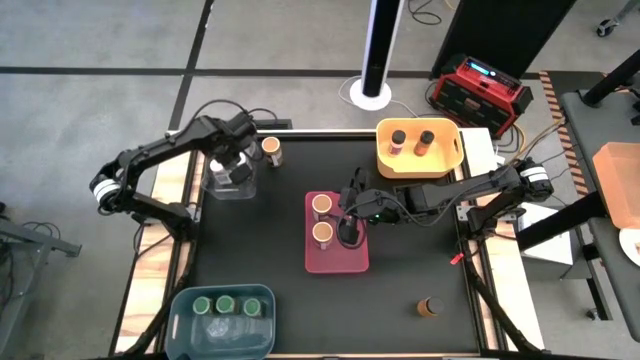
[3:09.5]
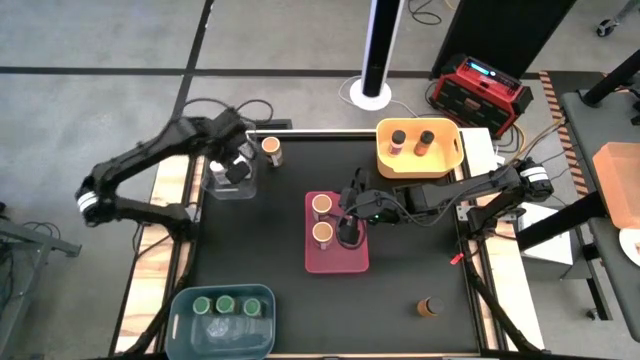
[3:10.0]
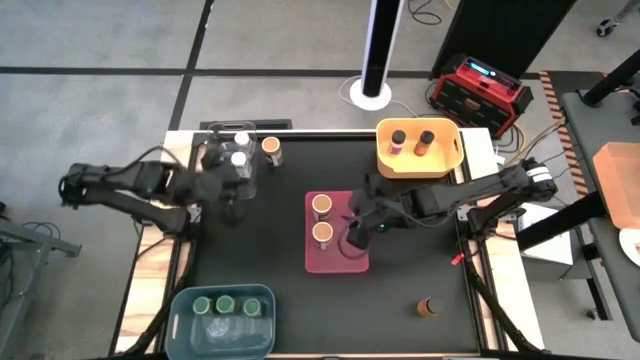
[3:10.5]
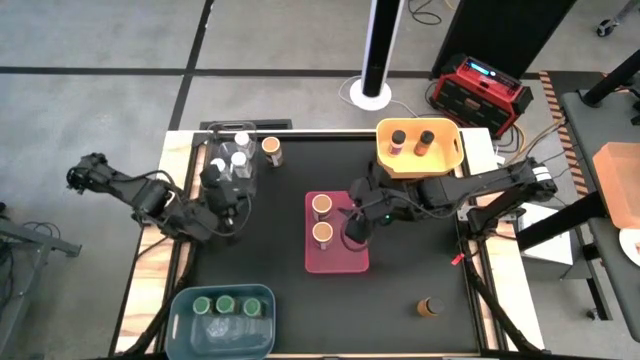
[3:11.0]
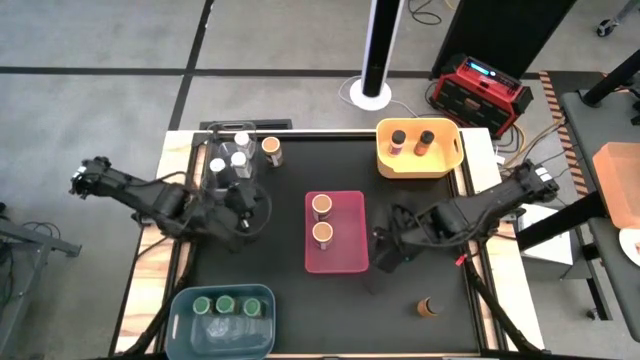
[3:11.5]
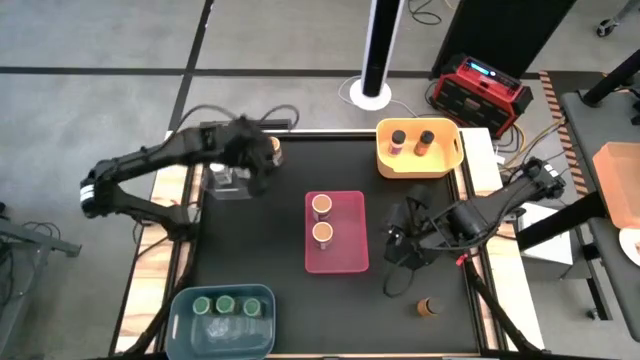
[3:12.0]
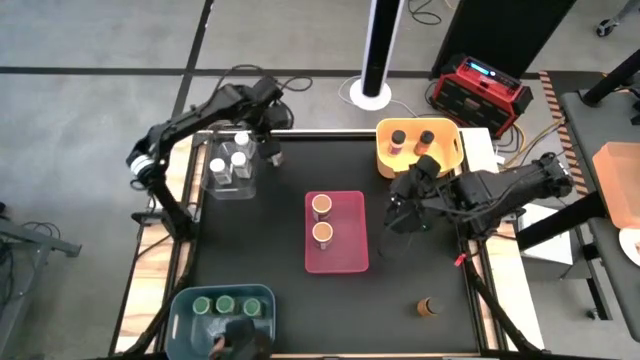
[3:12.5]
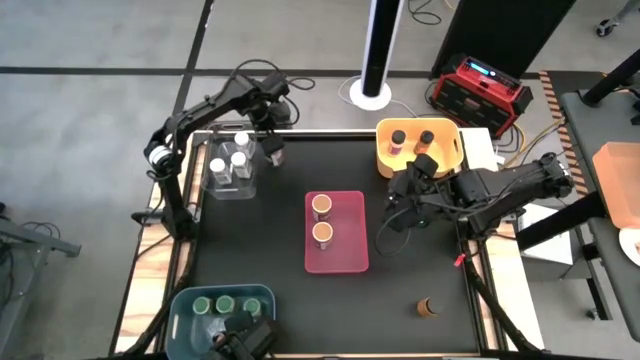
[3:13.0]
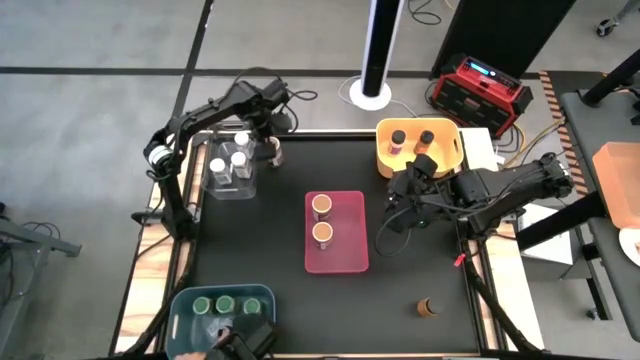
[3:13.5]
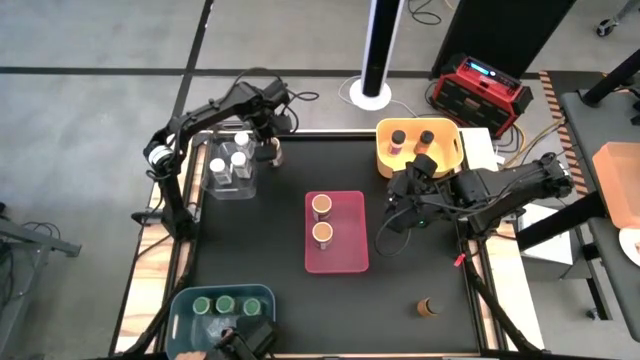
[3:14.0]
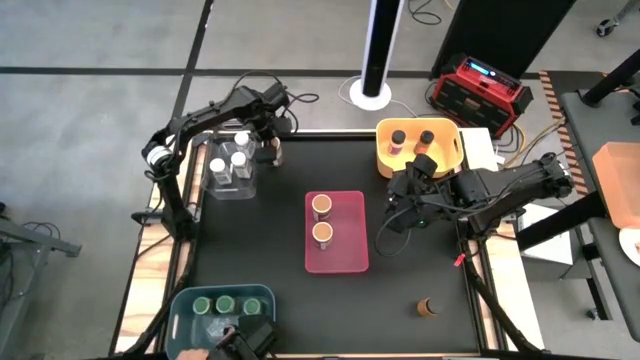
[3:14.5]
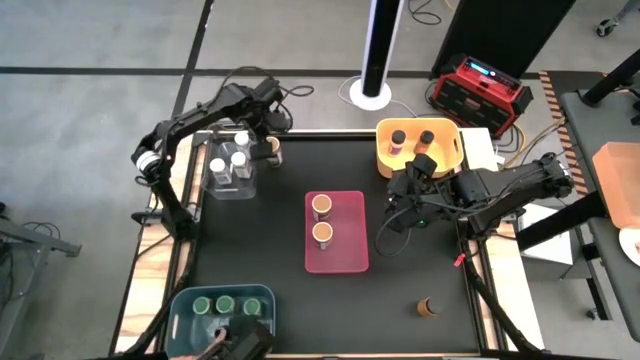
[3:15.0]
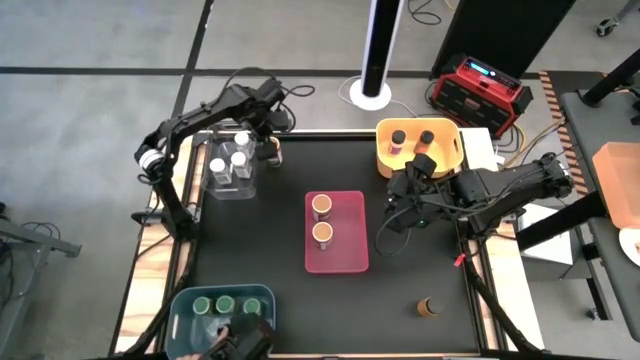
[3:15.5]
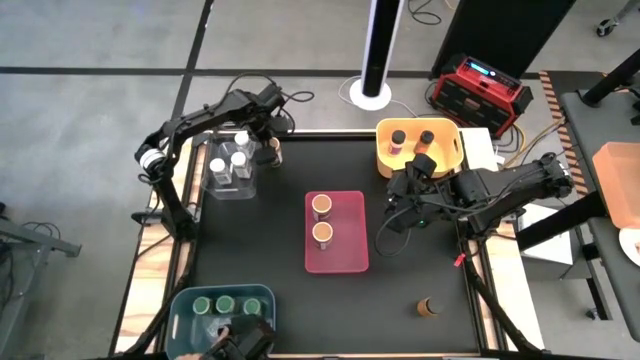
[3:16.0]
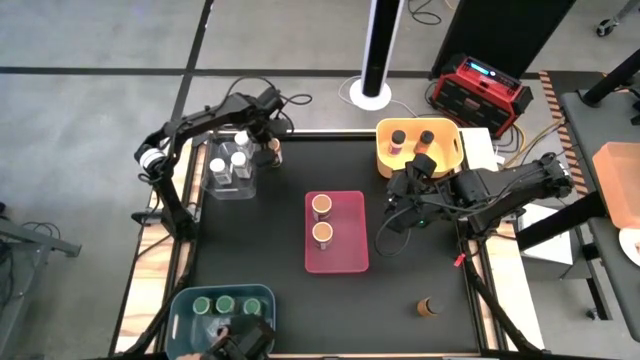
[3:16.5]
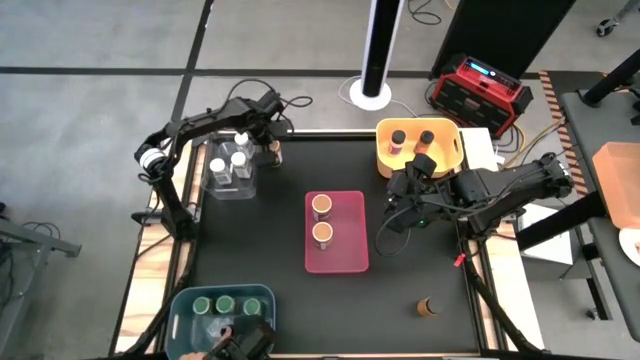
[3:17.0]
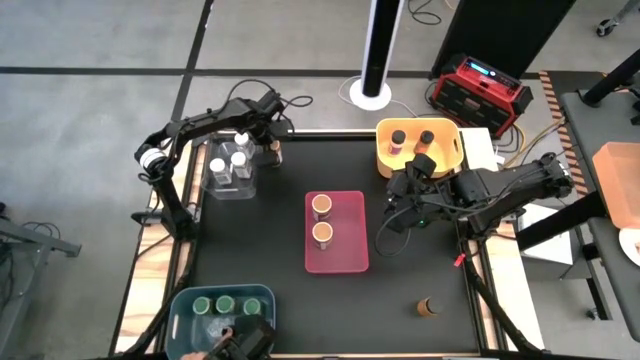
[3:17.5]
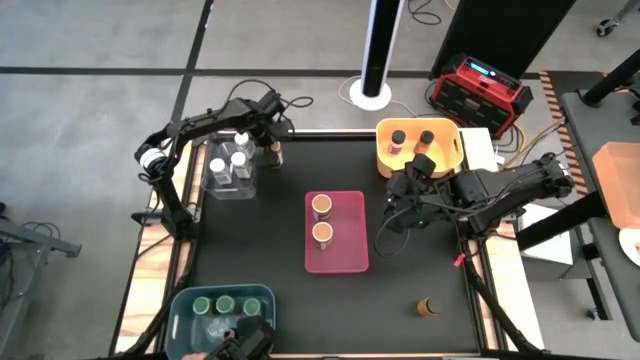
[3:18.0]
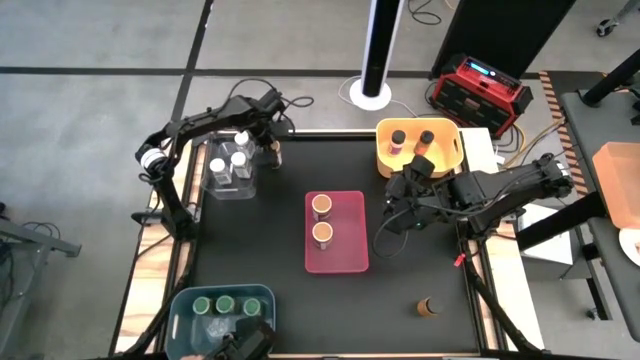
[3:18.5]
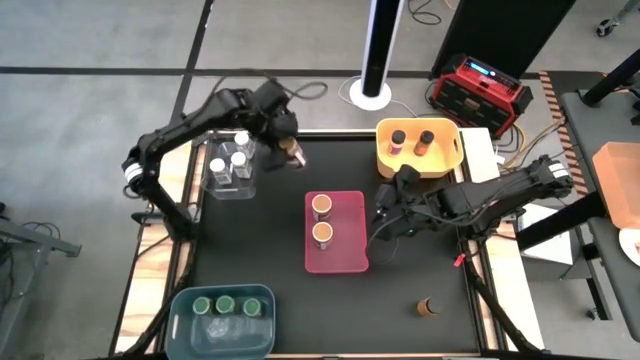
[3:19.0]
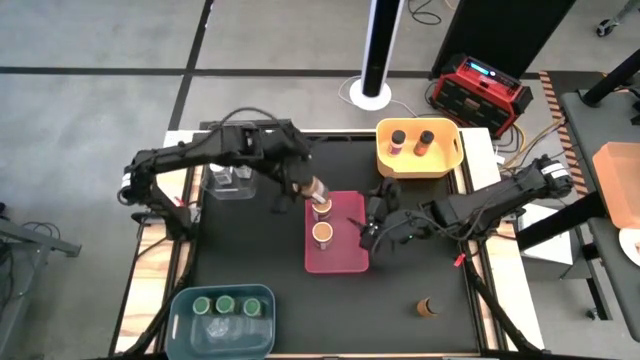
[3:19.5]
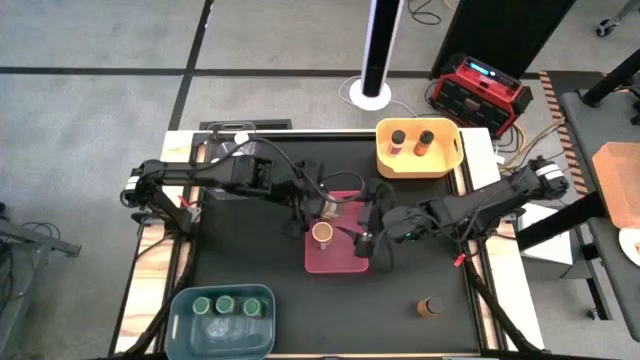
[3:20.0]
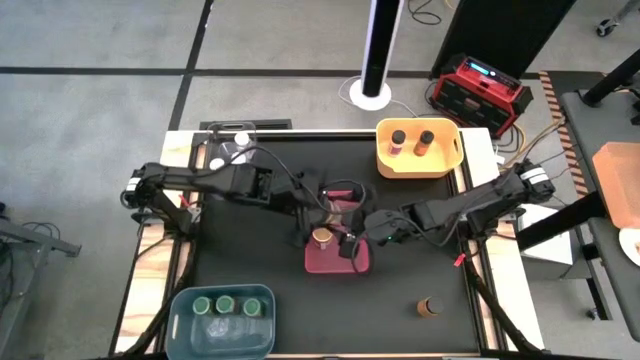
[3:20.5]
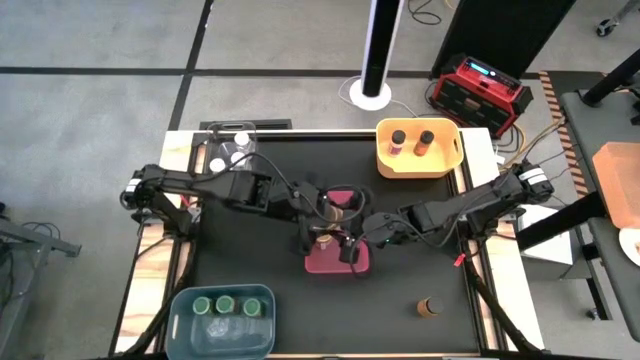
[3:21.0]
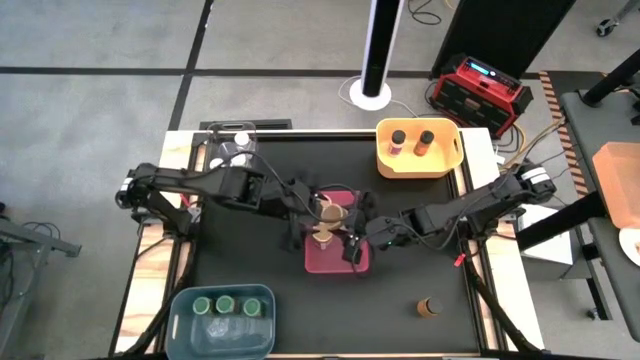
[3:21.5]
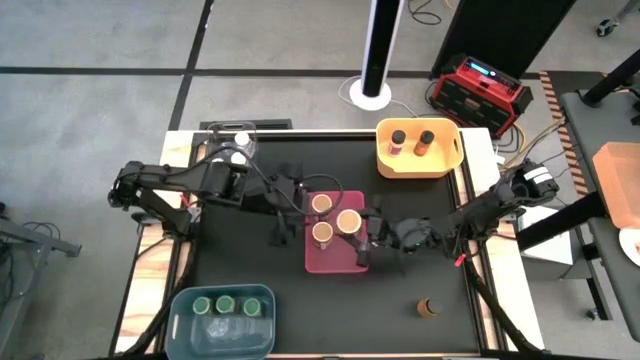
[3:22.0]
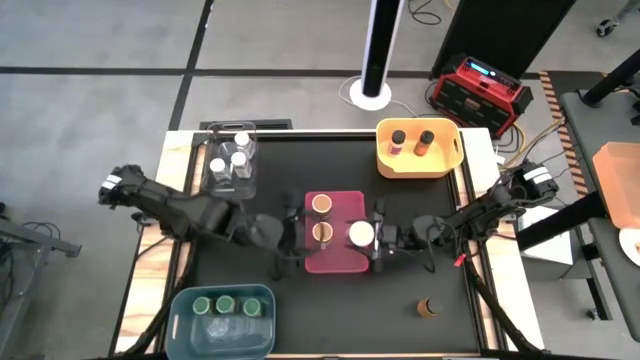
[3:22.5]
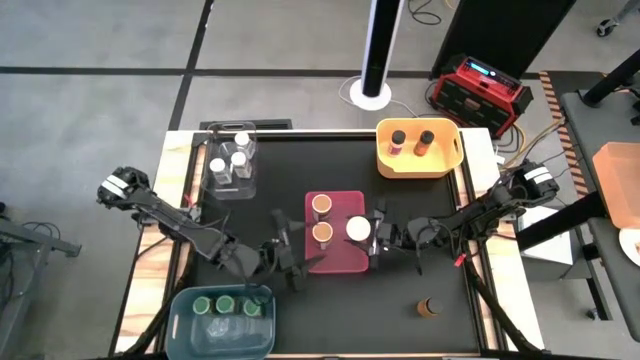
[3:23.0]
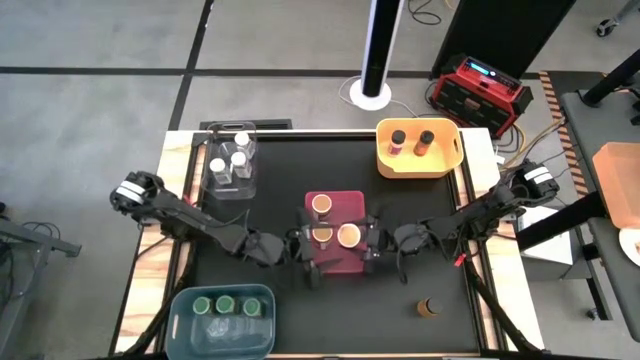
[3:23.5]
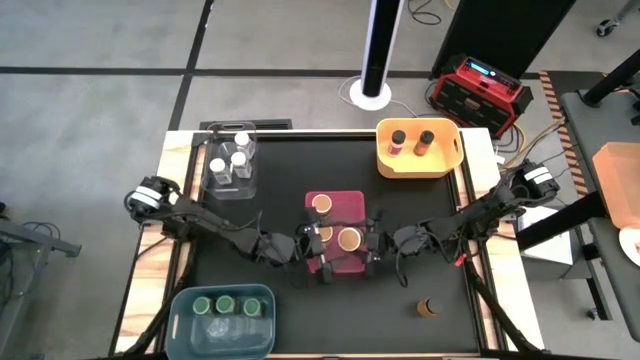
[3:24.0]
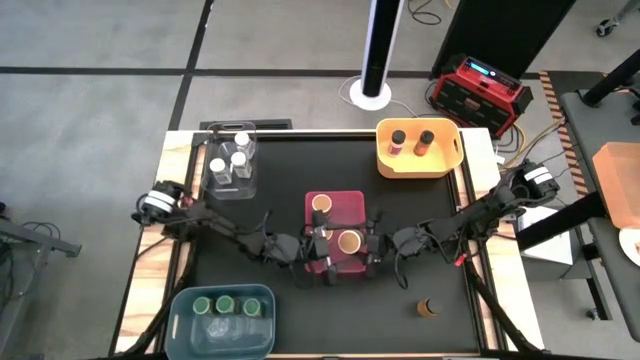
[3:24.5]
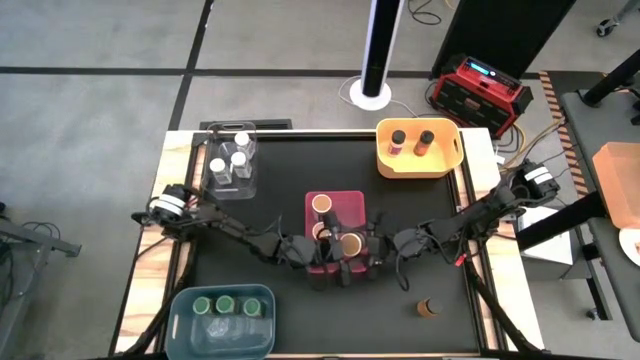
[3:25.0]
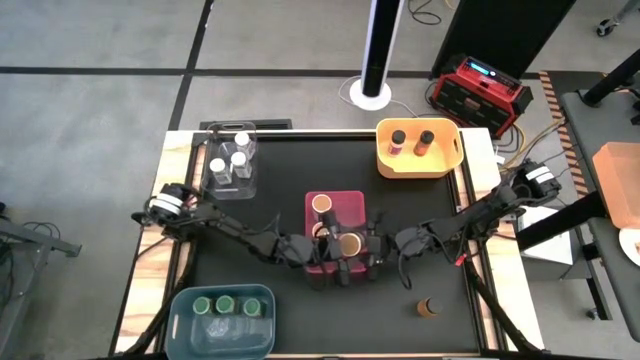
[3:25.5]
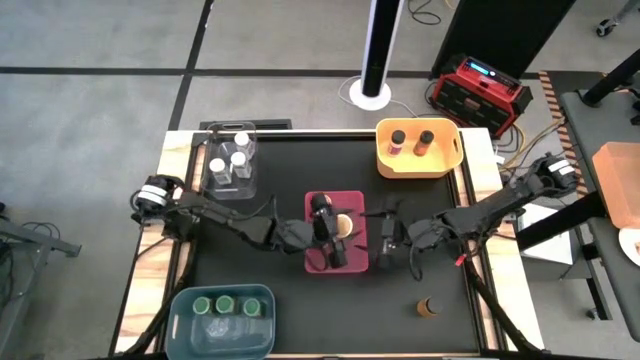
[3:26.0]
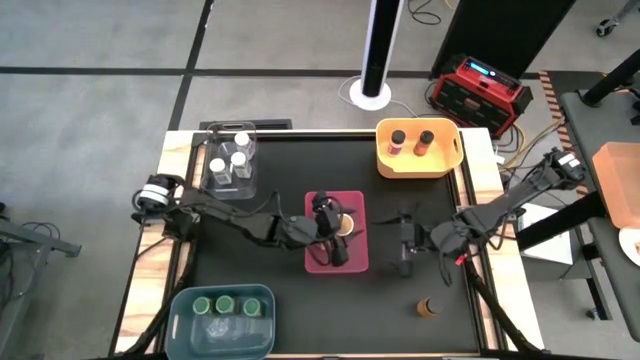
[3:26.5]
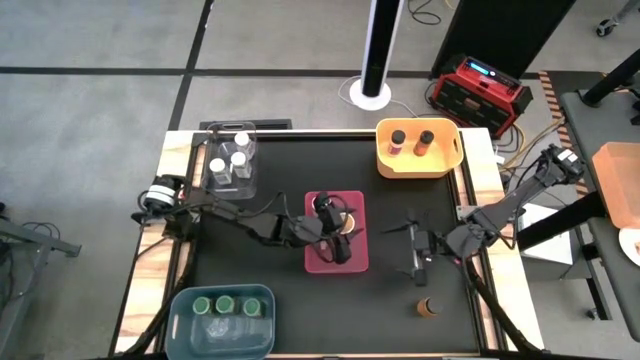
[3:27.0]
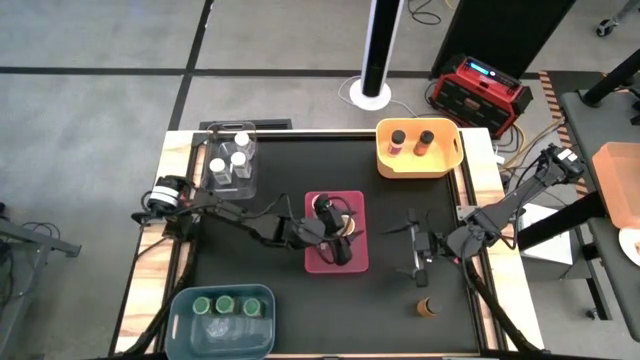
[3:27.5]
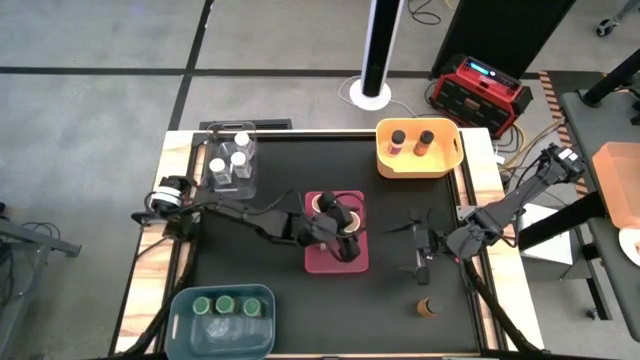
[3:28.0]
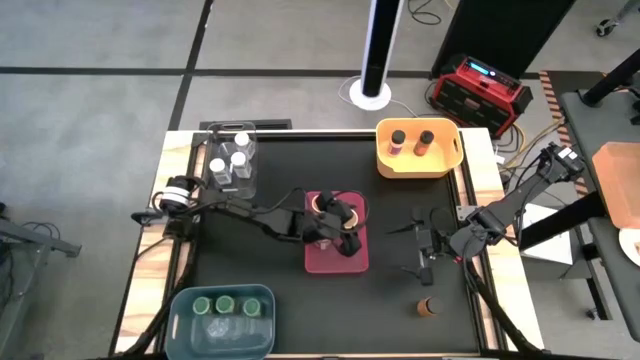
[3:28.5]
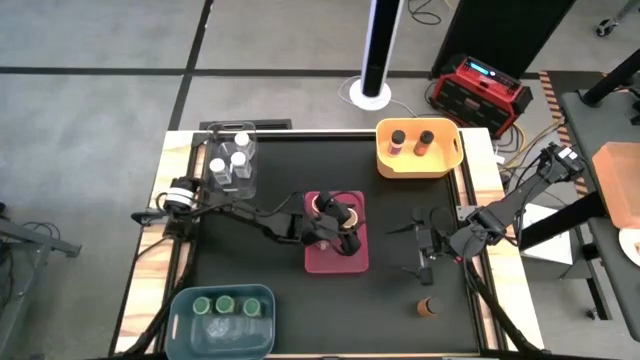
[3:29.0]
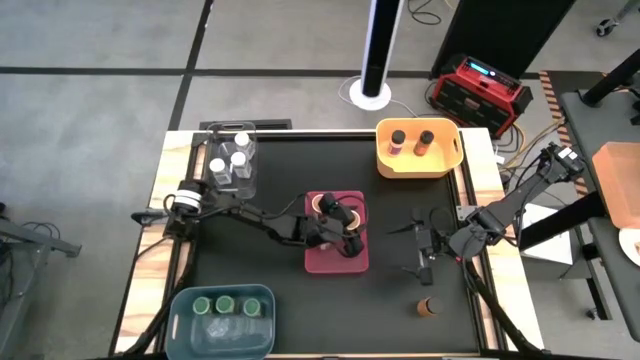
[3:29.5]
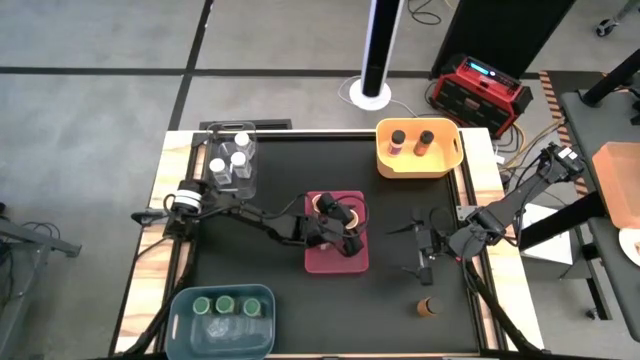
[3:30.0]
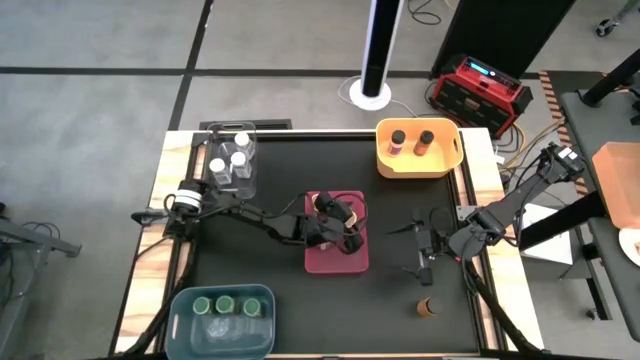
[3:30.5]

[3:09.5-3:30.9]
Task: Sort spices by type
Put the gold seasoning bottle into the red bin
